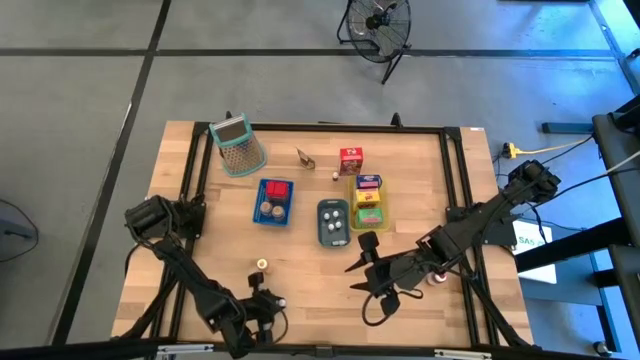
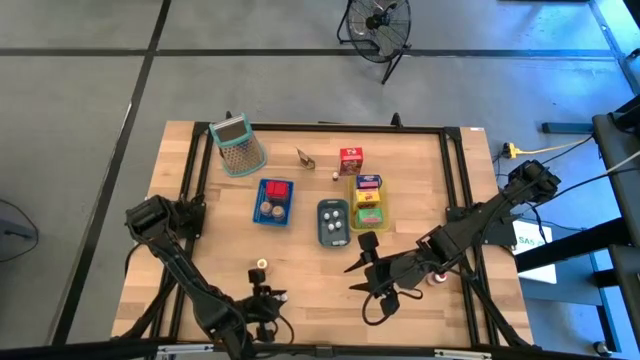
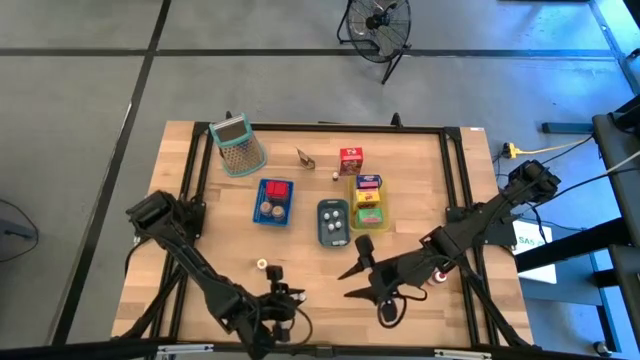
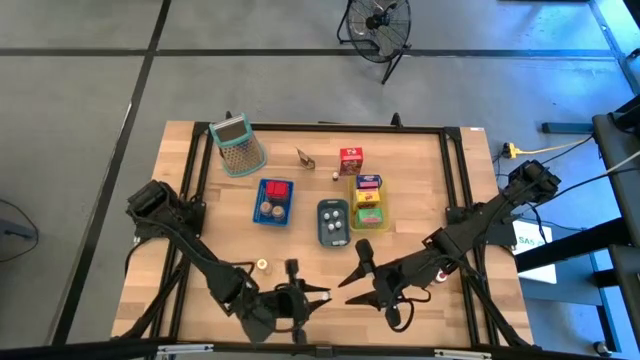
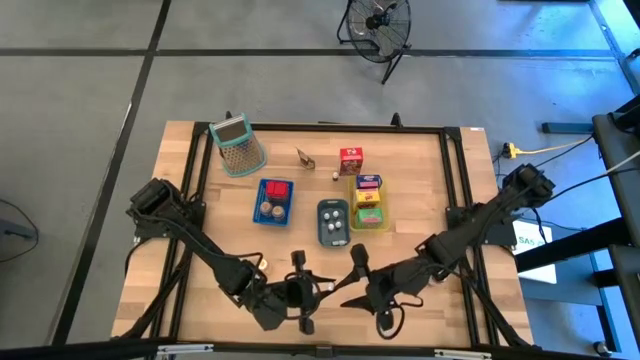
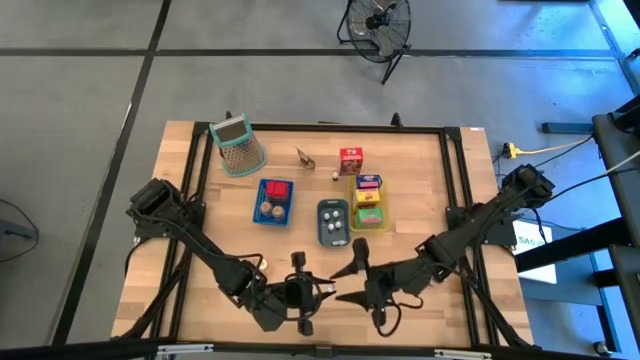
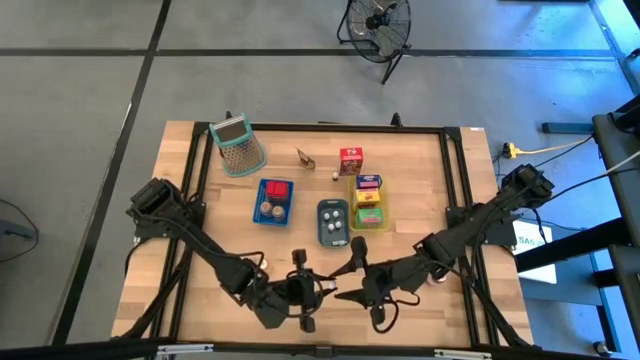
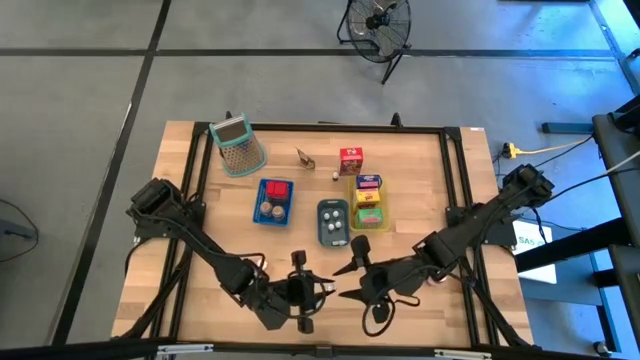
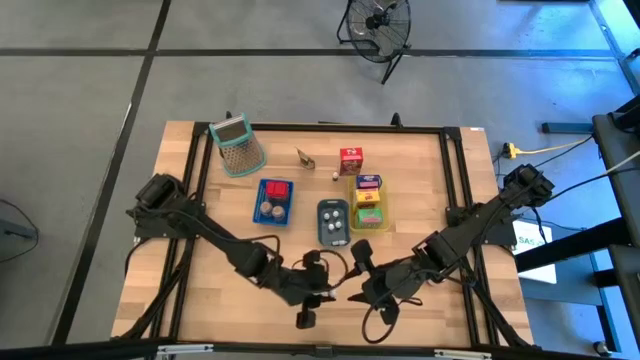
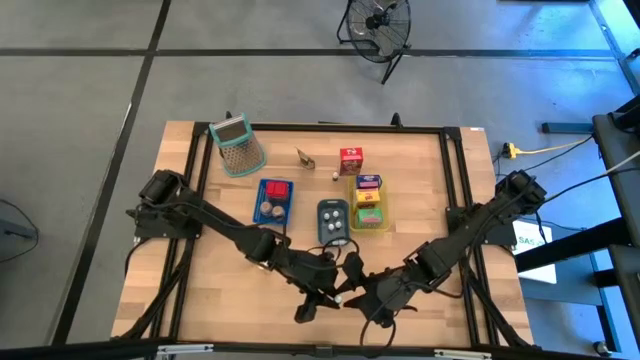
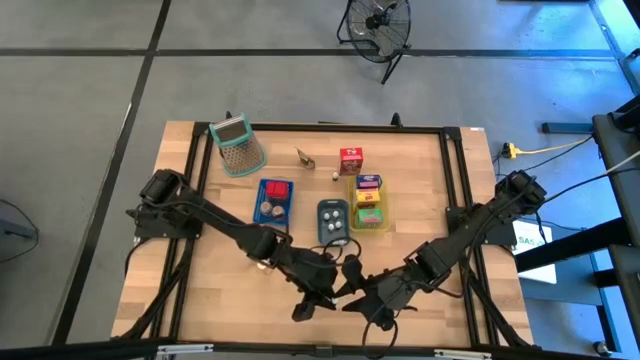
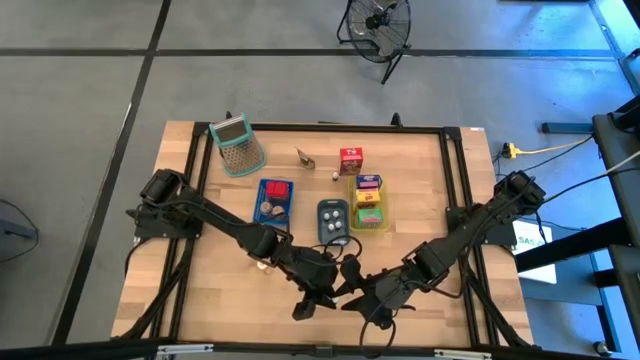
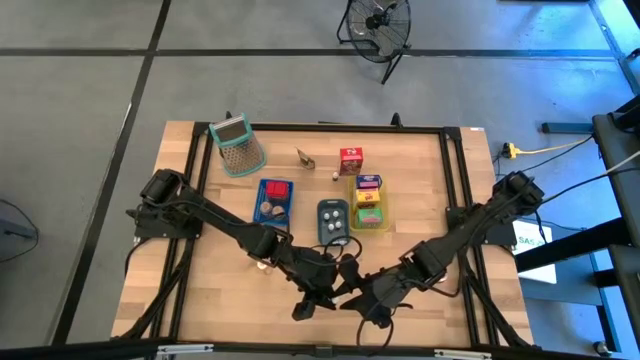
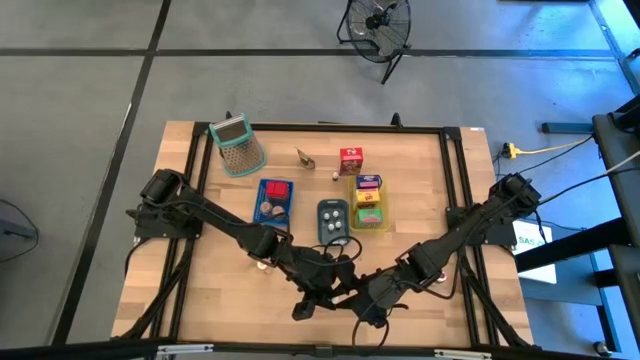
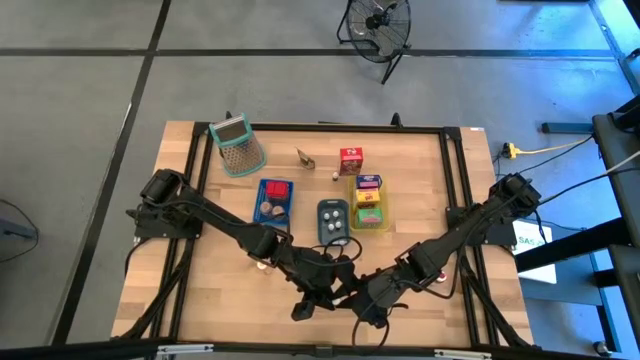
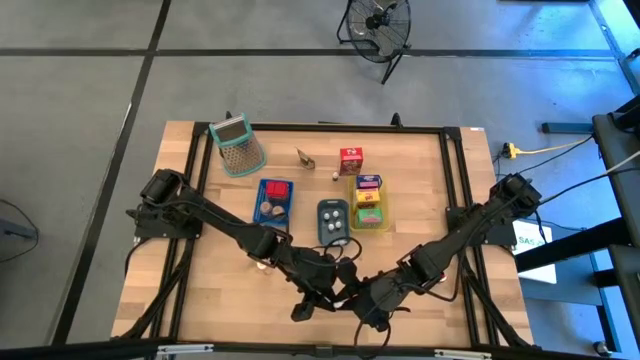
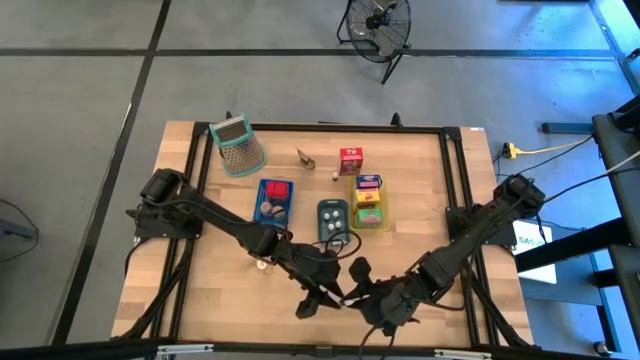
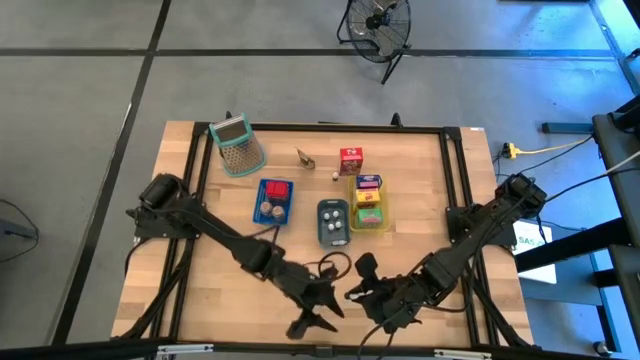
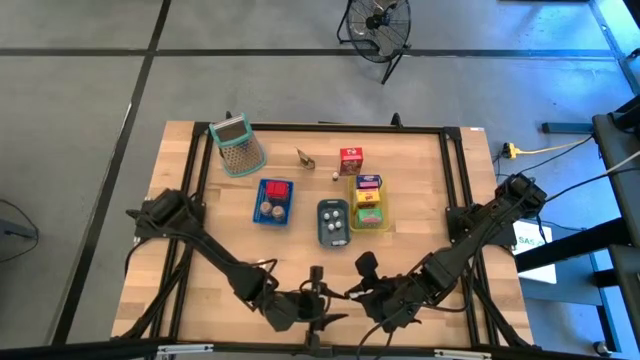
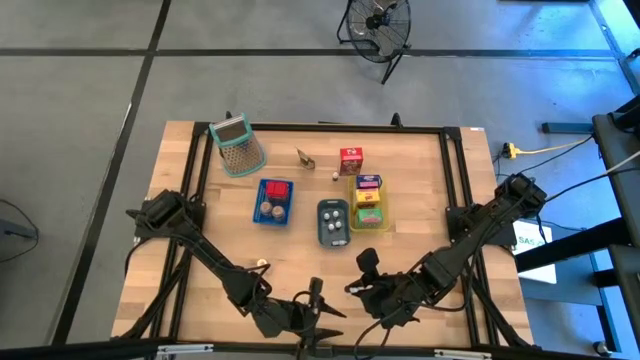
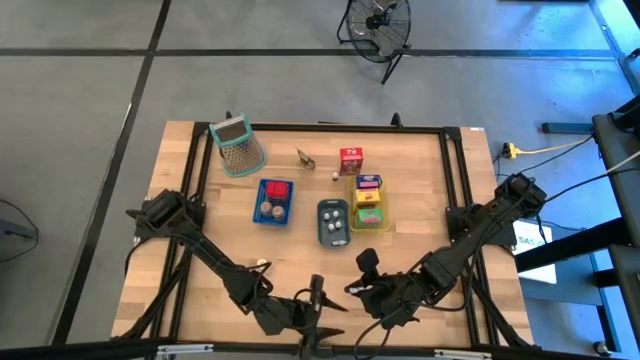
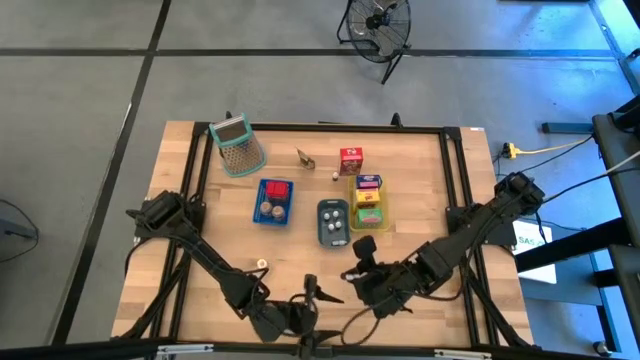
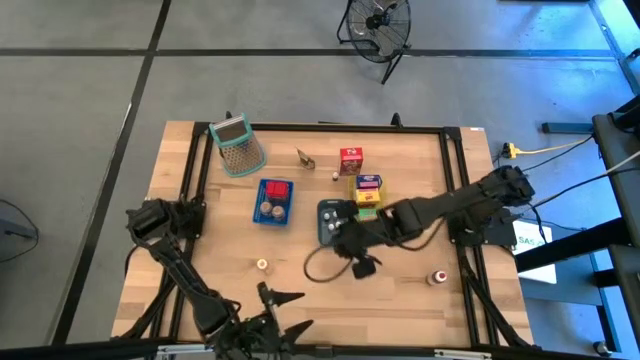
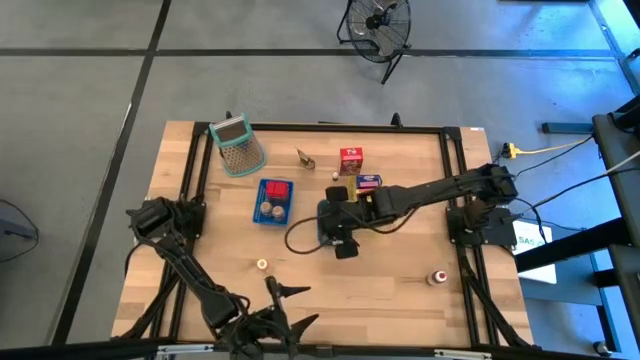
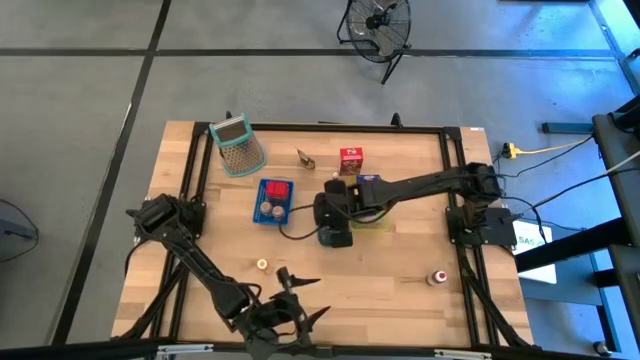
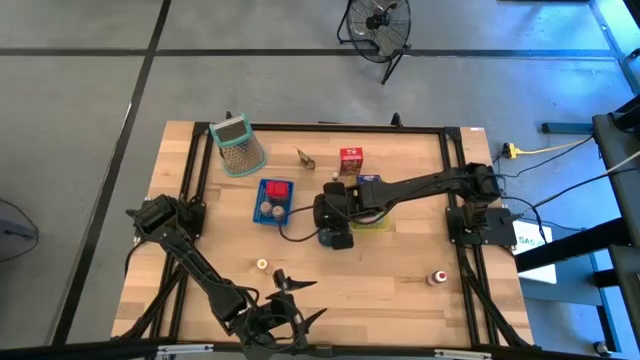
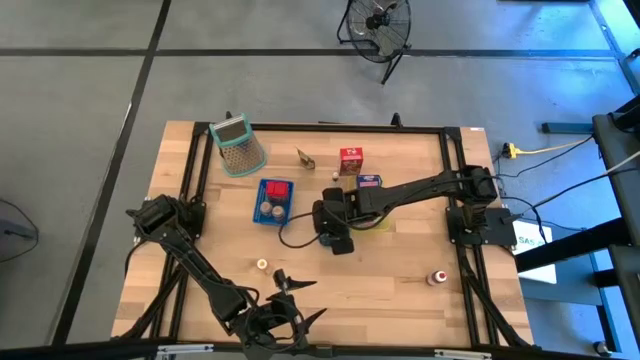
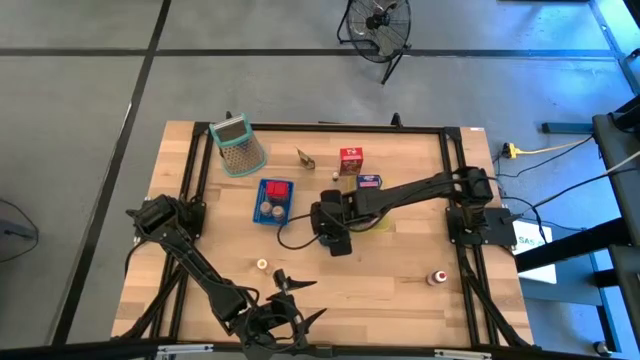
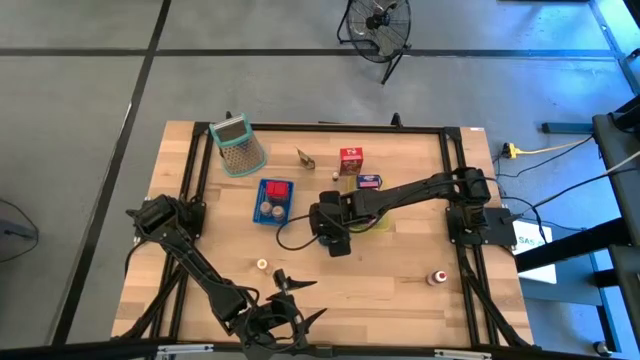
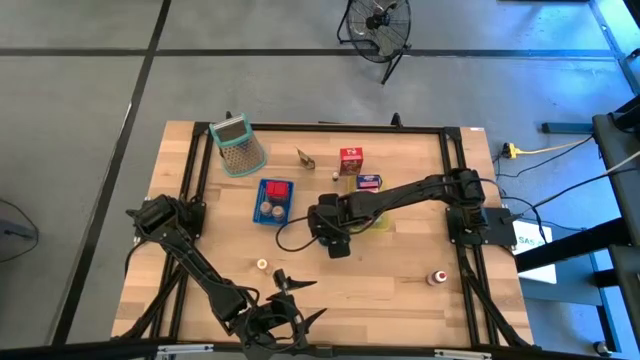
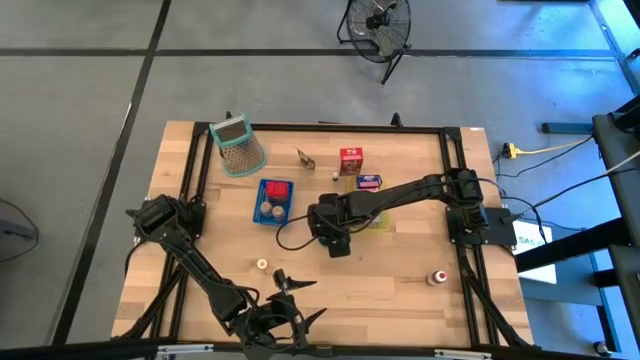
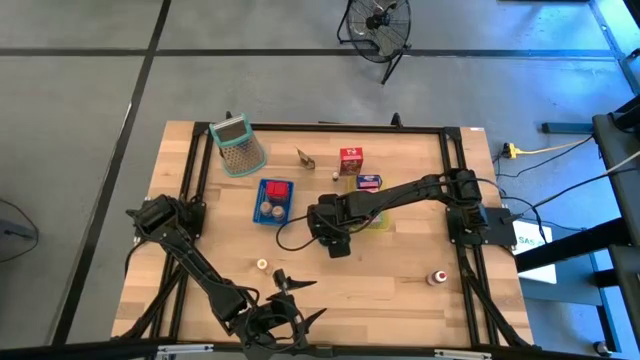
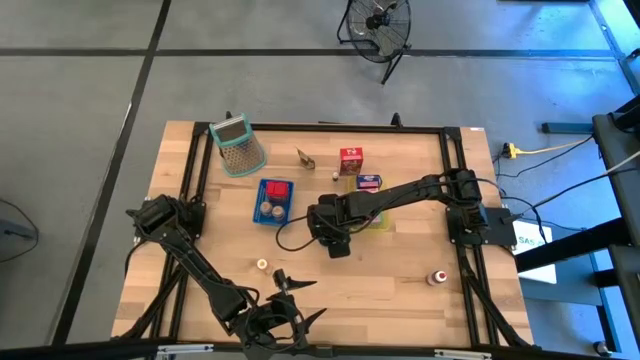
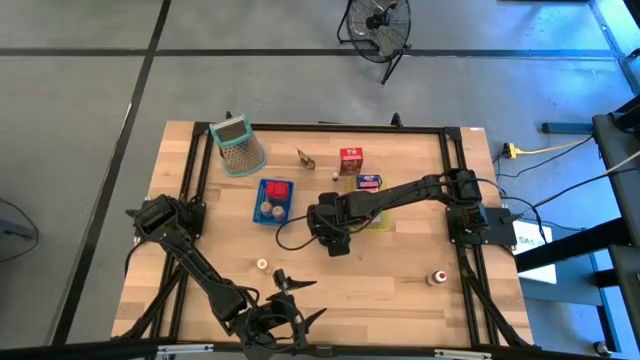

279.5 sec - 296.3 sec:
Task: Pick & Place Kitchen Items
Put the small green food coloring into the green bin

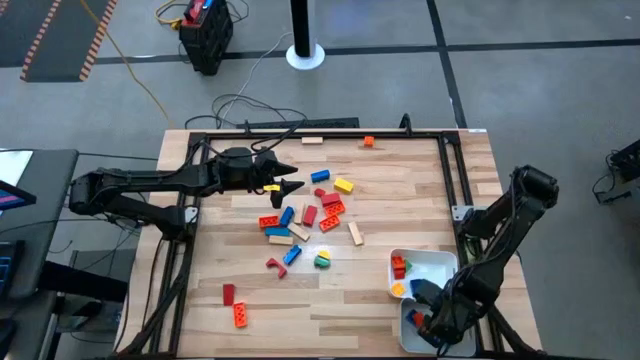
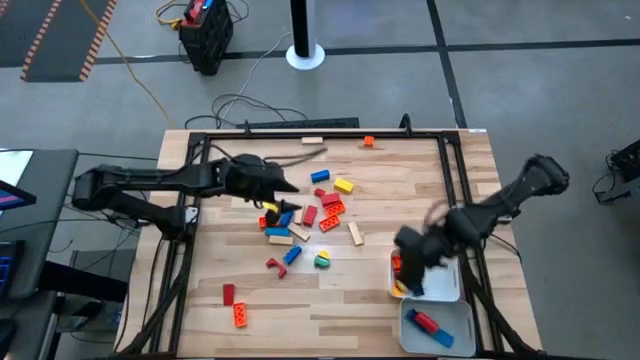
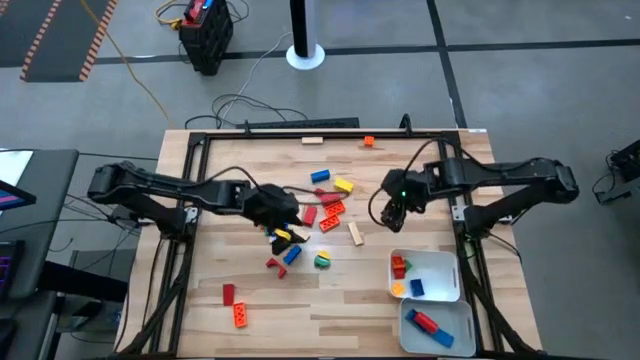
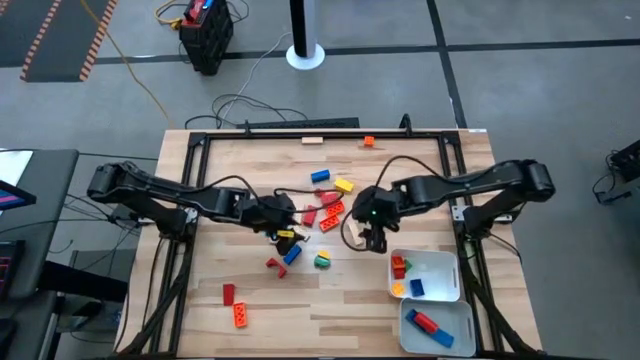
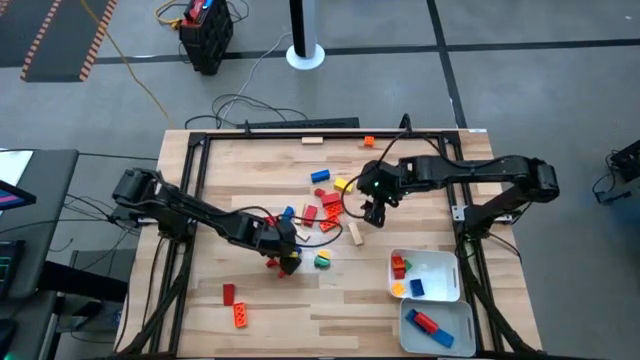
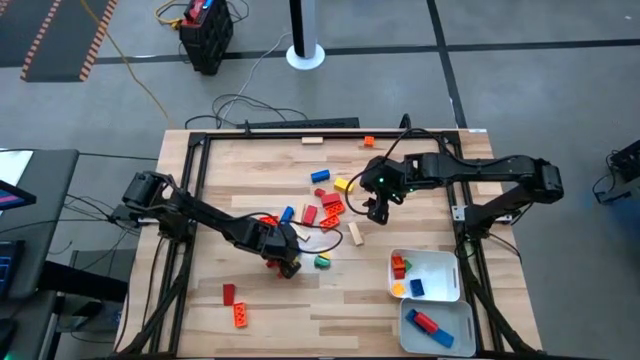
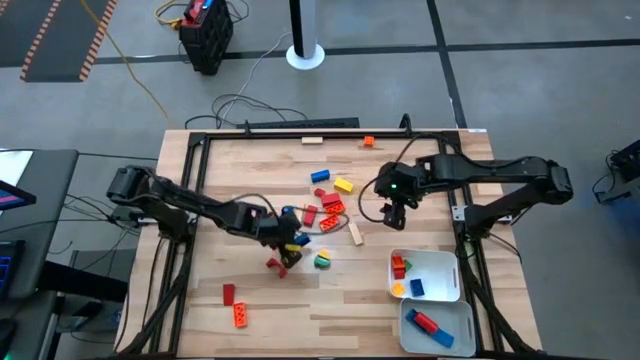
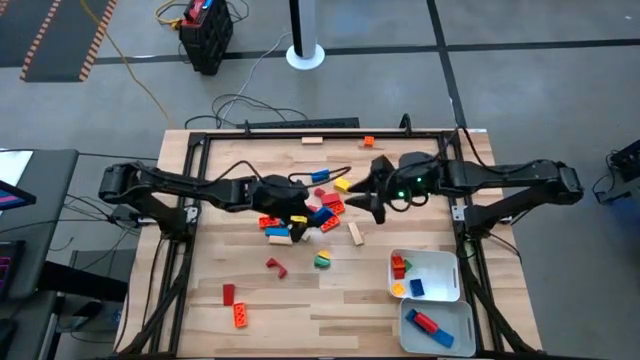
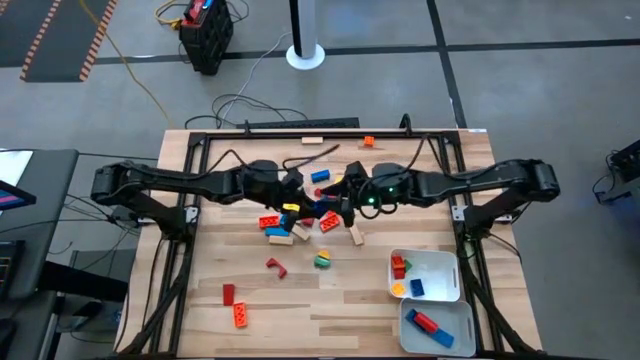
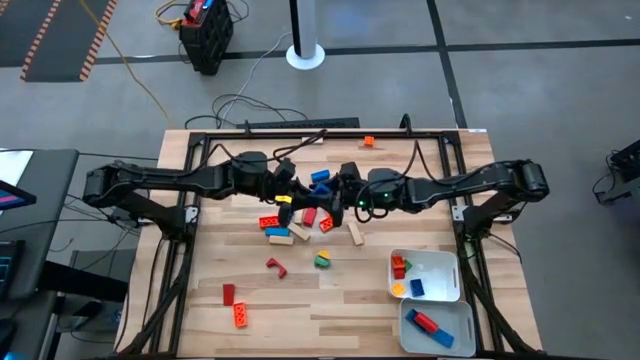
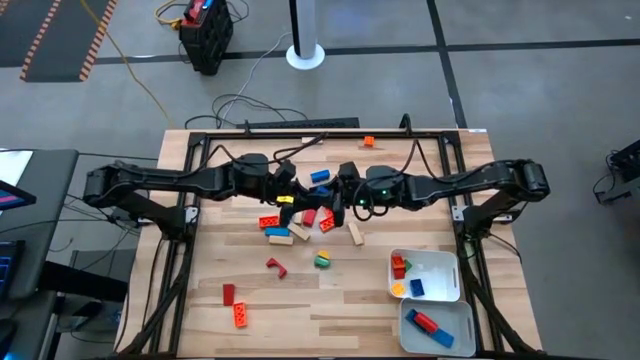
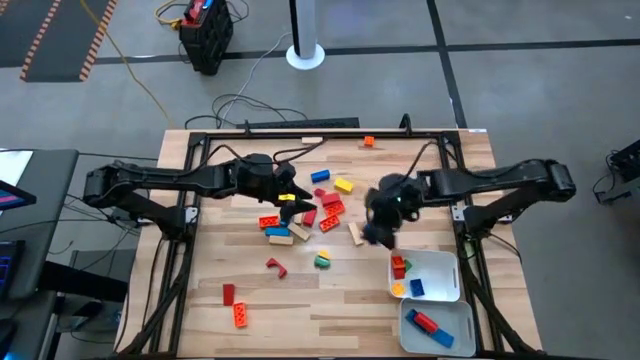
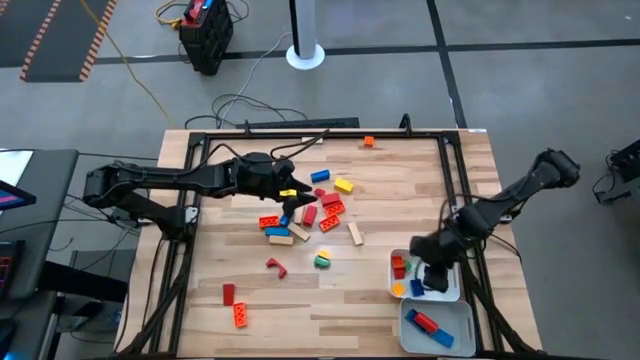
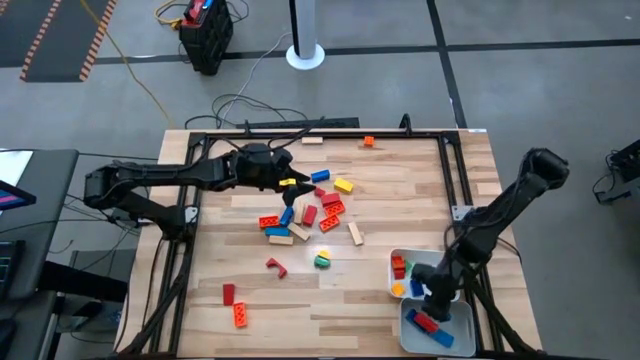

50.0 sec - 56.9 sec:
Task: Sort blocks by size
Put the big blue game piece into the gray bin
